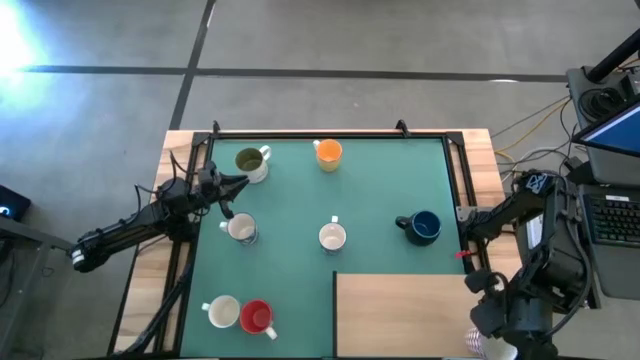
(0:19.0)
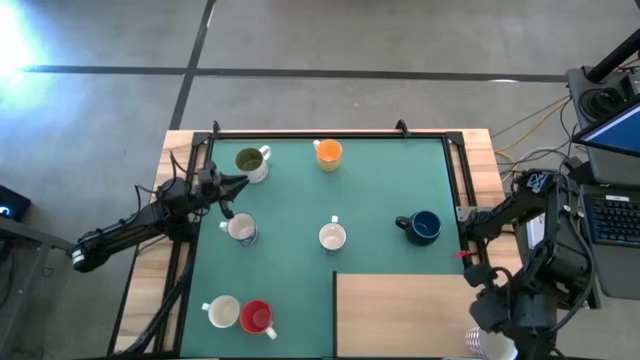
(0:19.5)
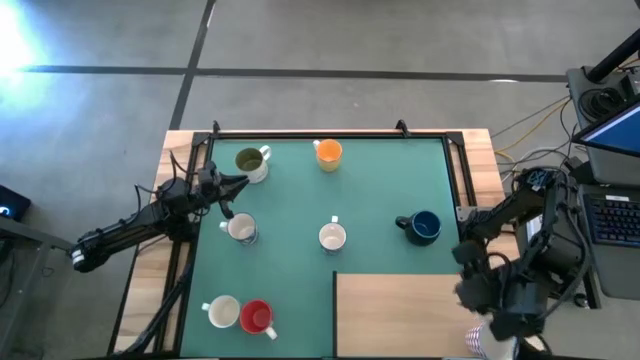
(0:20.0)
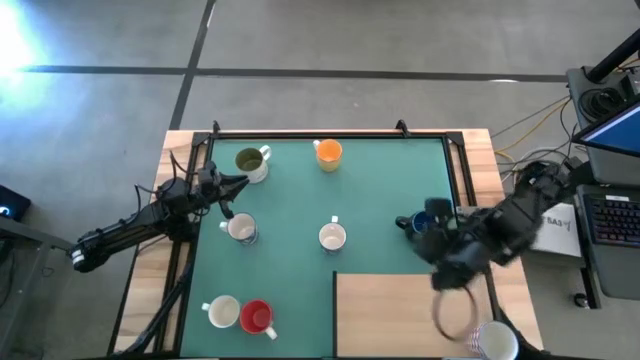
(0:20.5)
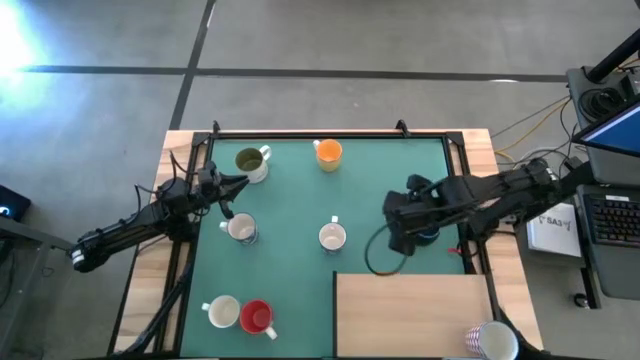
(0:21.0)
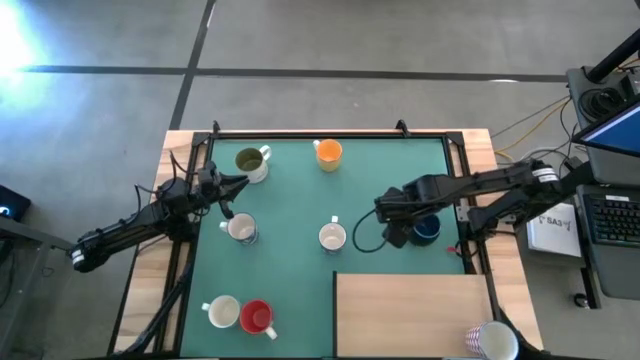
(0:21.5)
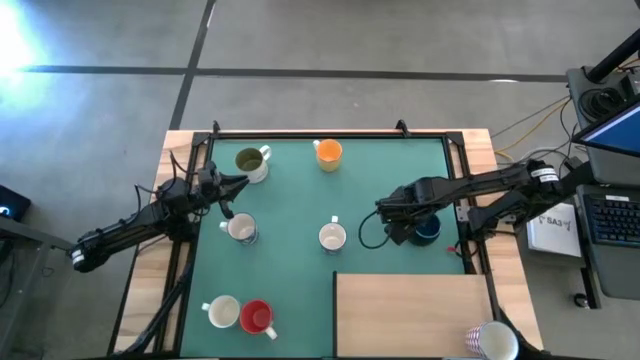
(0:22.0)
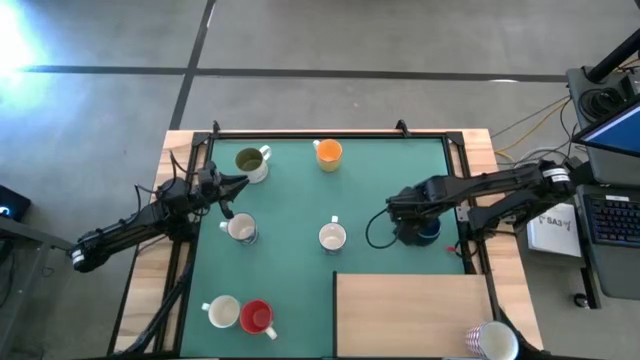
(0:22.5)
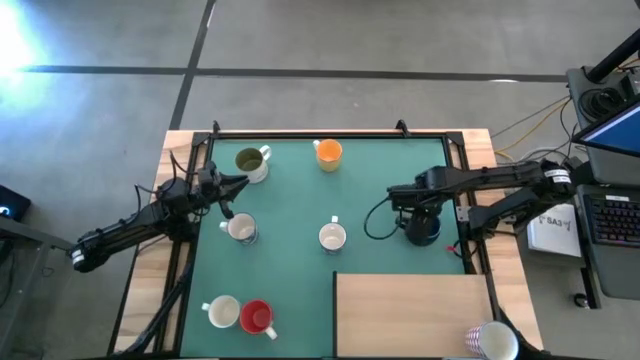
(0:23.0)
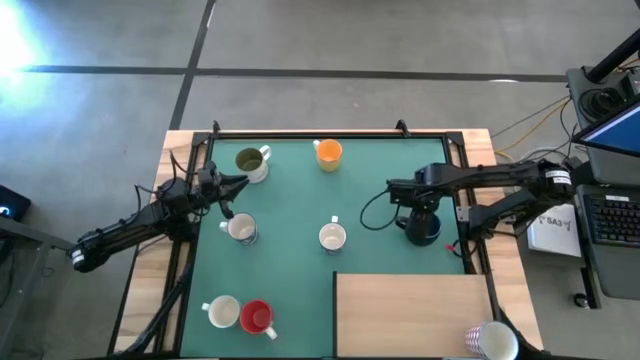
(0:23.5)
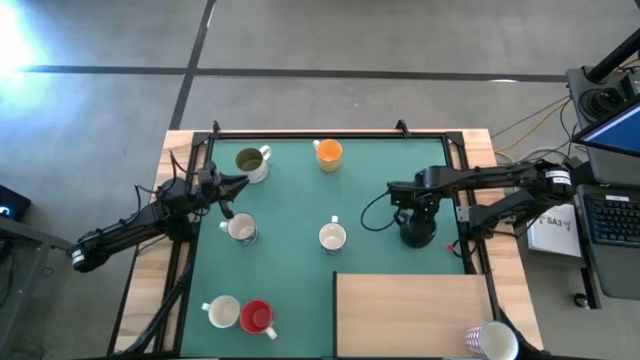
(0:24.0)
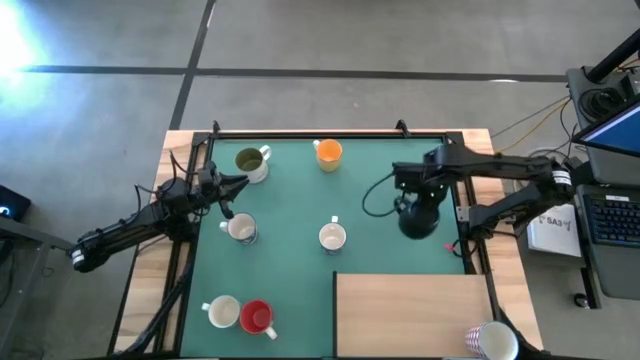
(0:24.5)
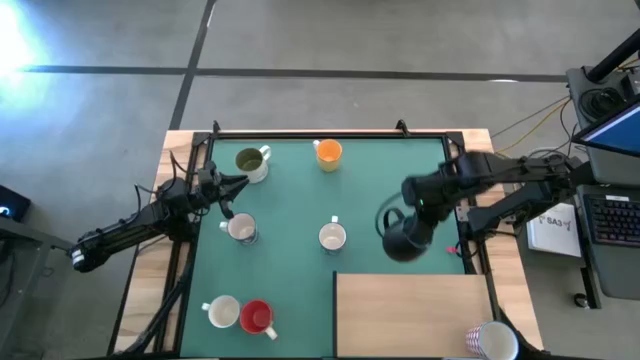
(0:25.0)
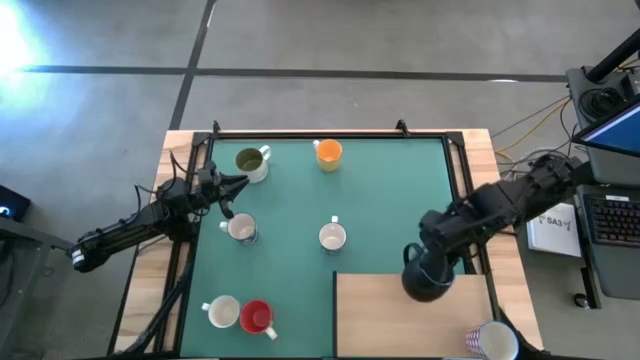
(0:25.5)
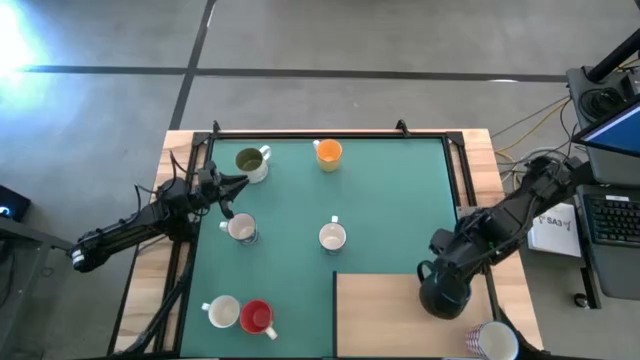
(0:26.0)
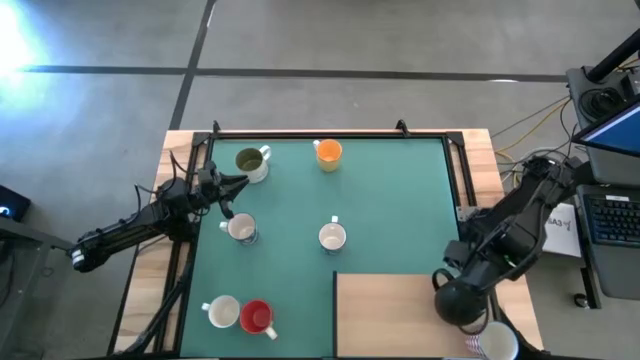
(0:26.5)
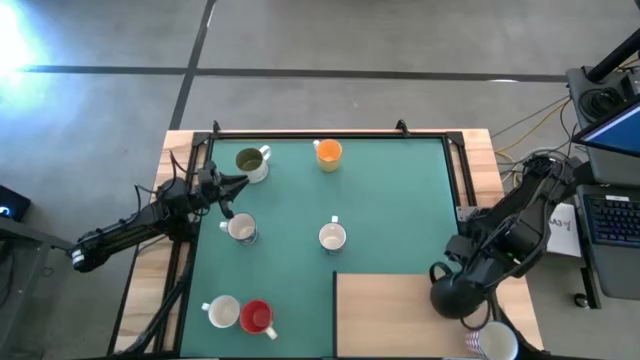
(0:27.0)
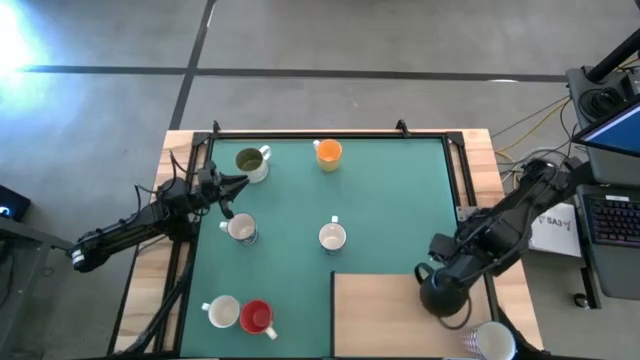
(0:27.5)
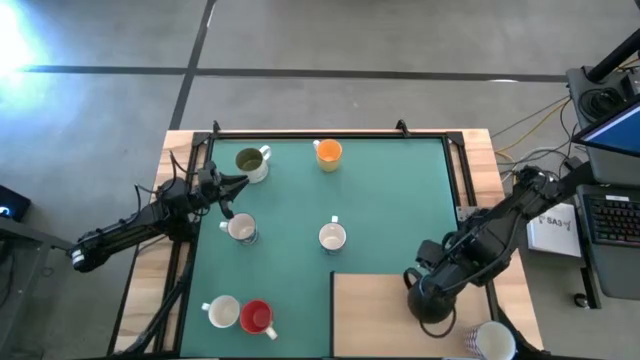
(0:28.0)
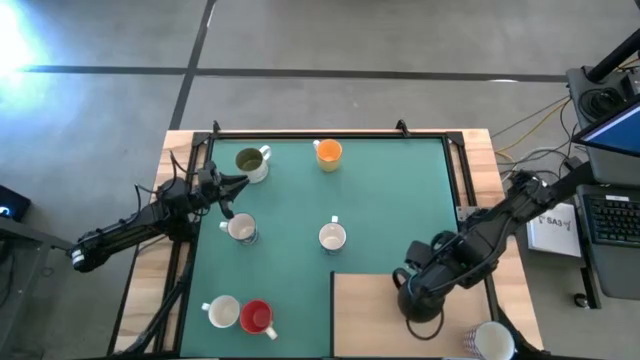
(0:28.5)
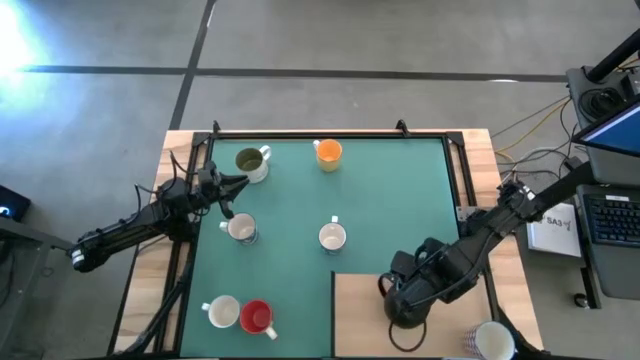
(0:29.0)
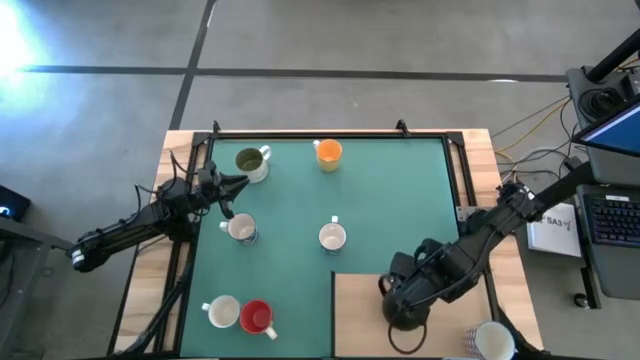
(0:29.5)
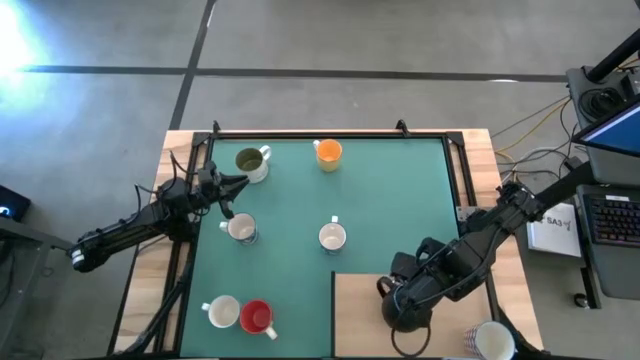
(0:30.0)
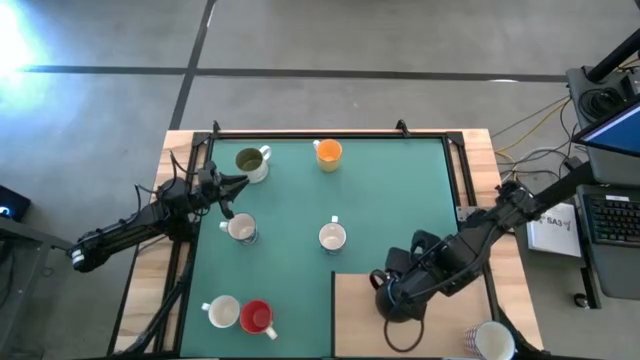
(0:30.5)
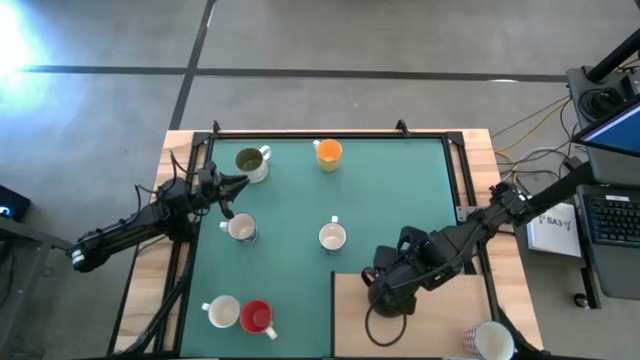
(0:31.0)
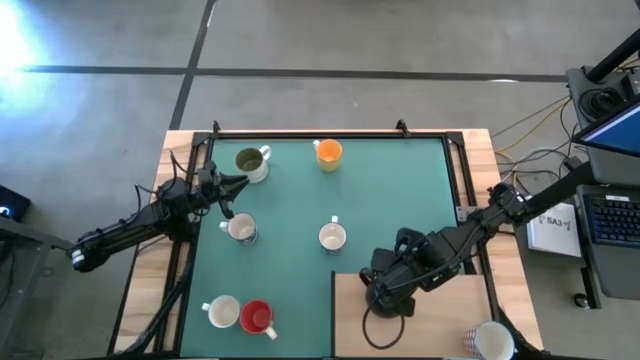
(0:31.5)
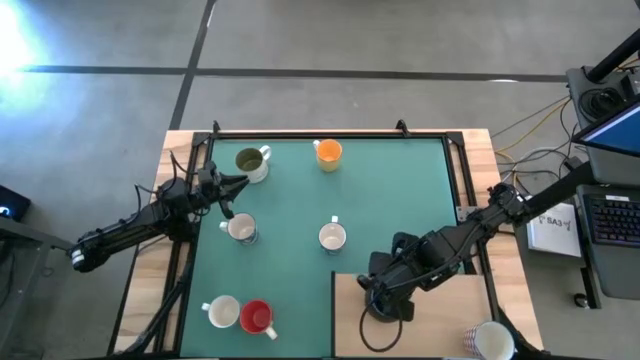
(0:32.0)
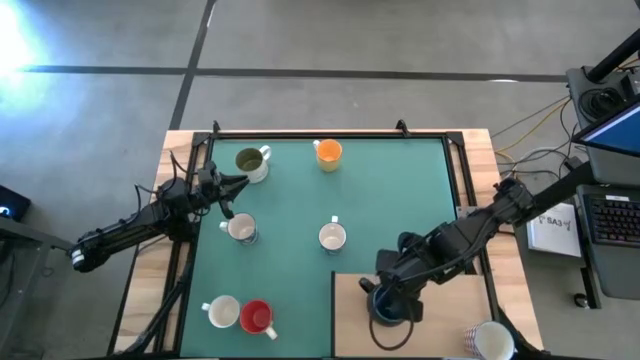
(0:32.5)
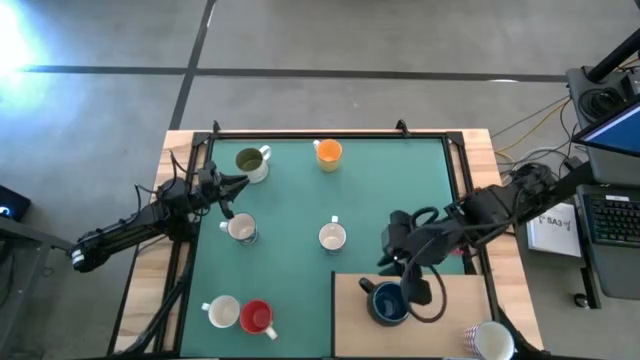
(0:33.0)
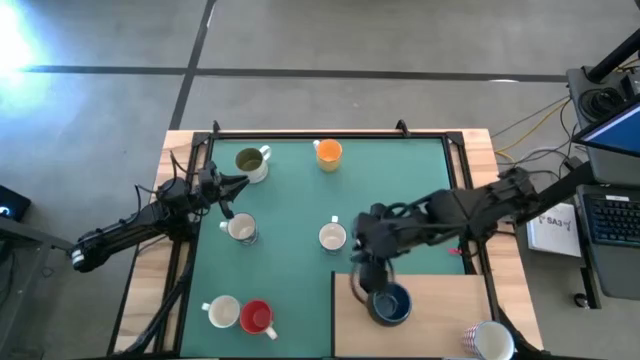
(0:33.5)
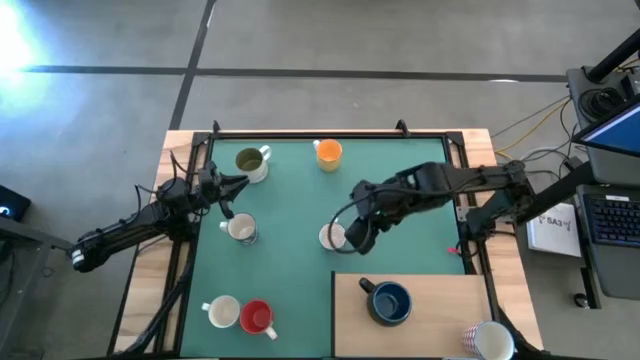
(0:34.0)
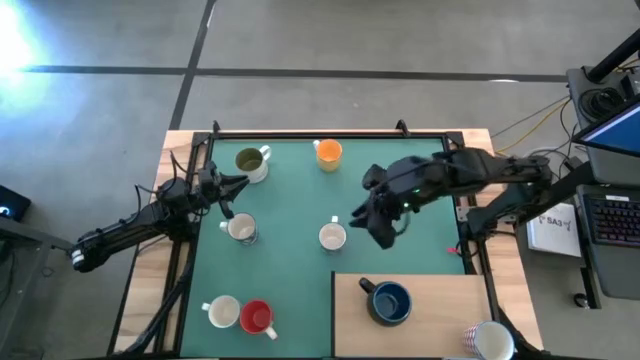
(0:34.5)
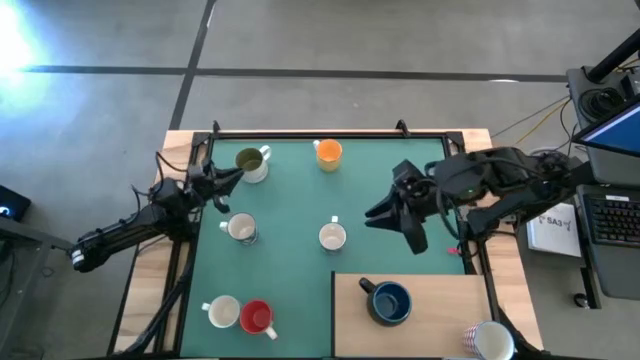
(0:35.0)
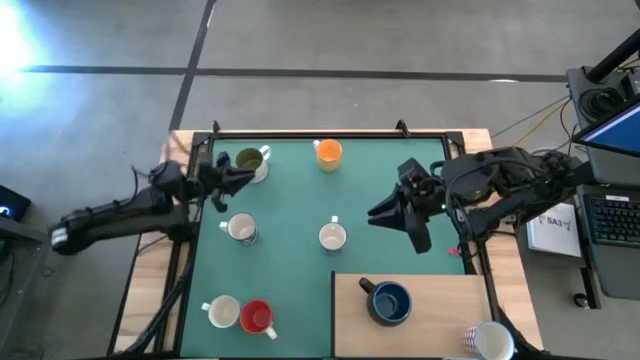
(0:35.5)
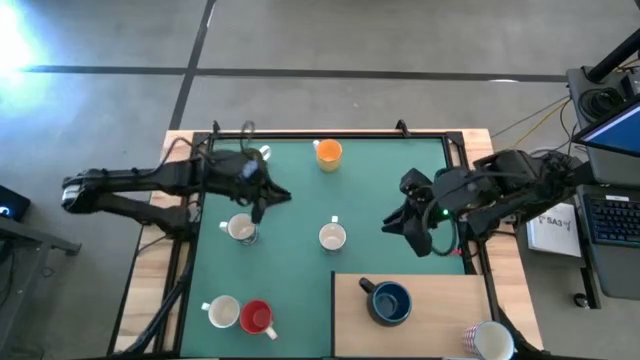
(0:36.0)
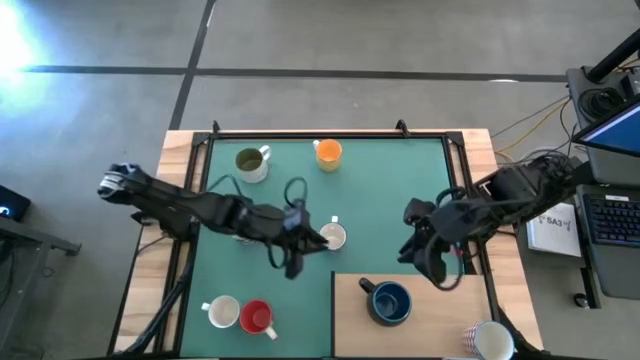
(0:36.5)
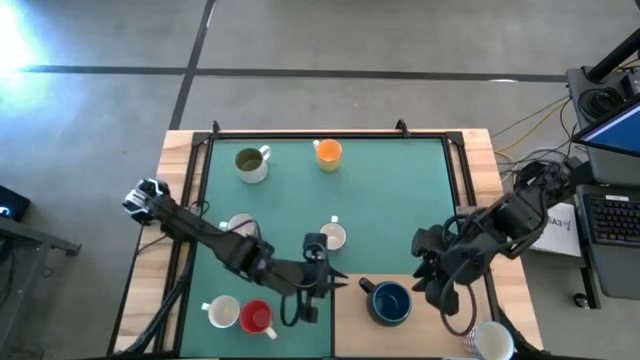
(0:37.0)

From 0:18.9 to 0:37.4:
Task: Place coffee mugs
Put the black mug on the shelf
